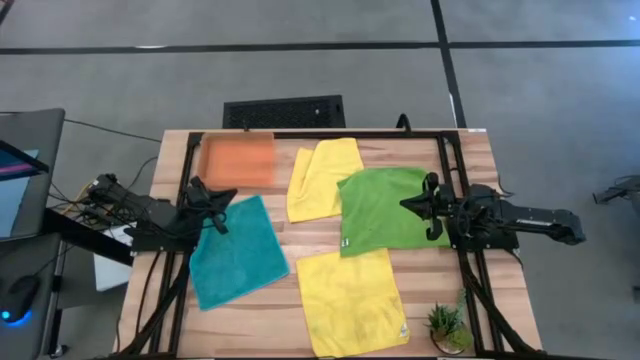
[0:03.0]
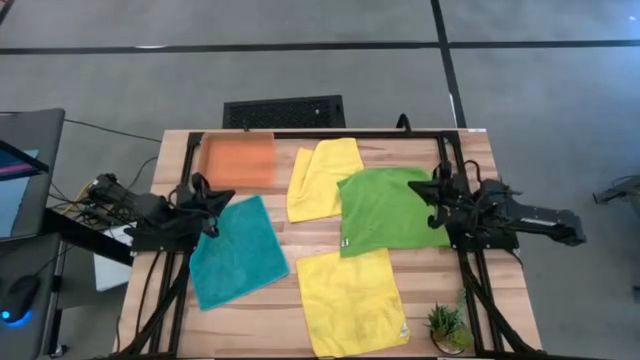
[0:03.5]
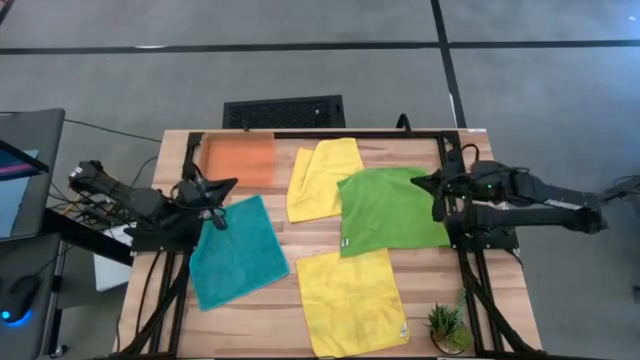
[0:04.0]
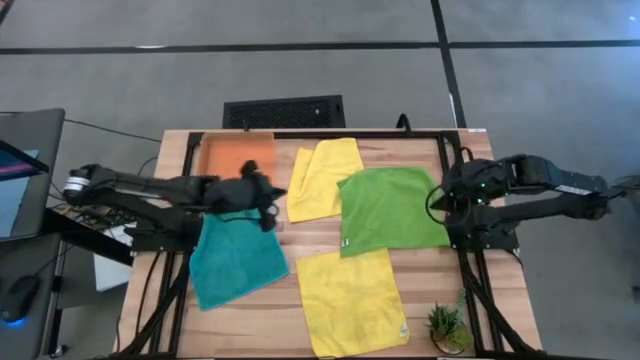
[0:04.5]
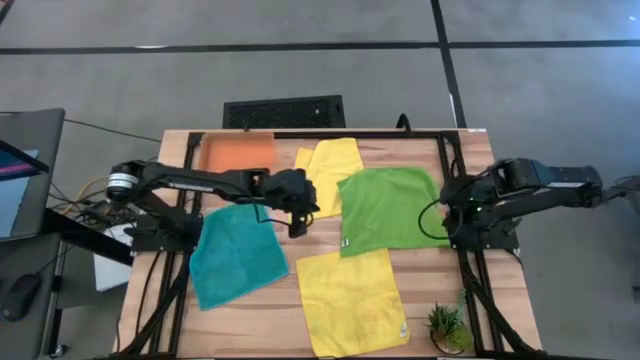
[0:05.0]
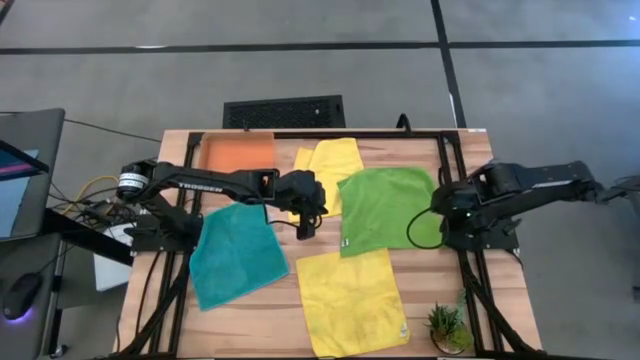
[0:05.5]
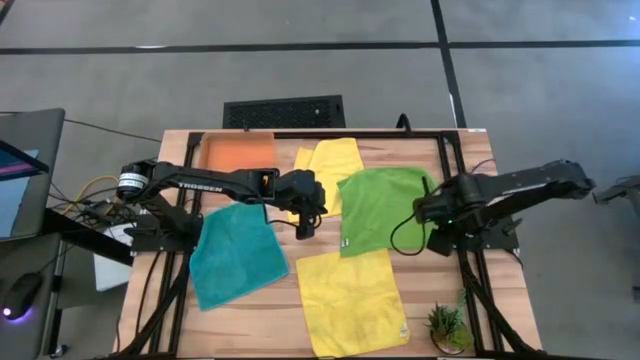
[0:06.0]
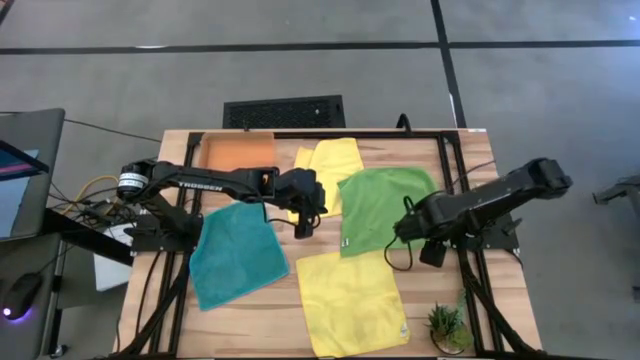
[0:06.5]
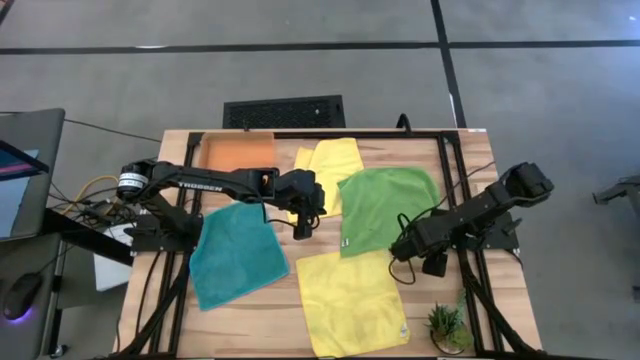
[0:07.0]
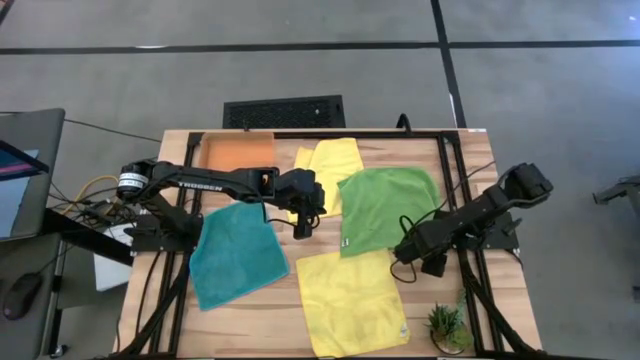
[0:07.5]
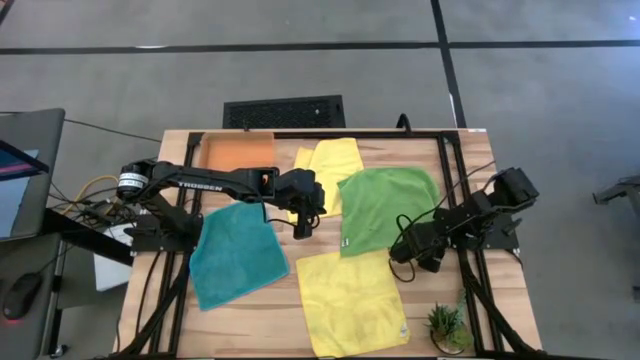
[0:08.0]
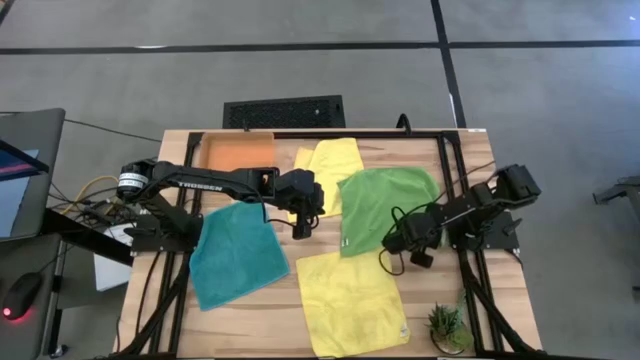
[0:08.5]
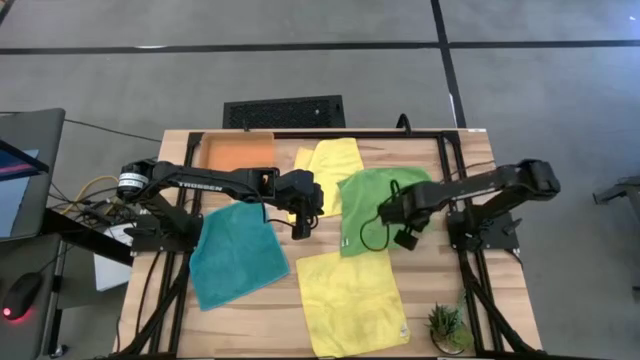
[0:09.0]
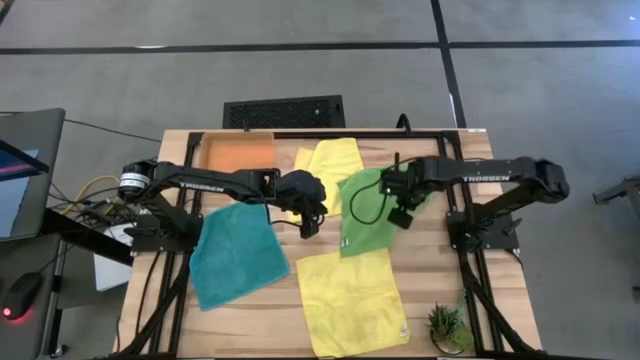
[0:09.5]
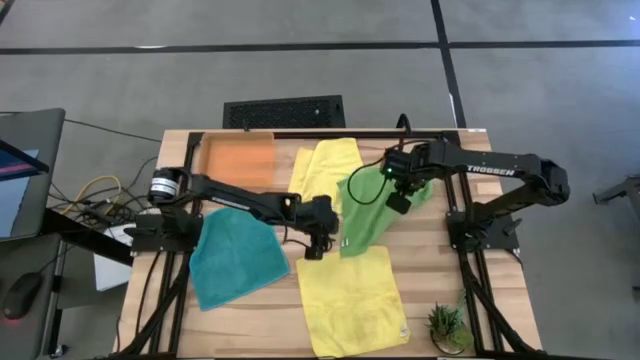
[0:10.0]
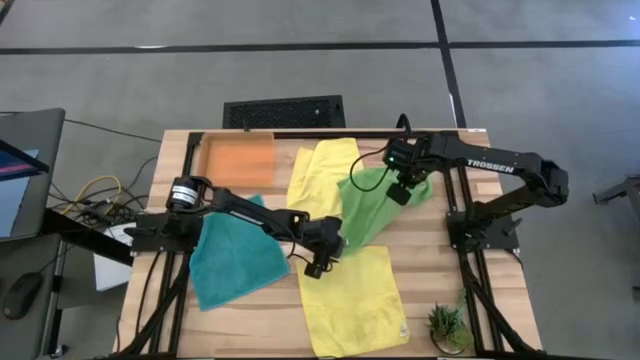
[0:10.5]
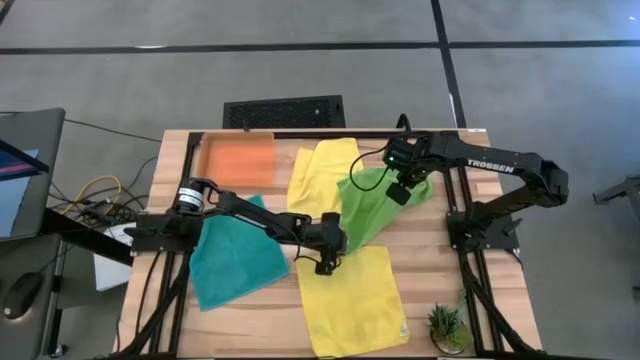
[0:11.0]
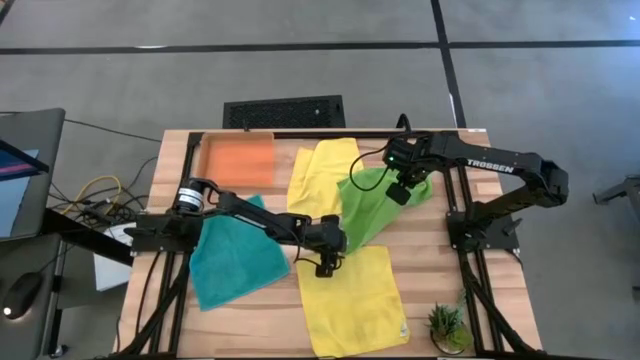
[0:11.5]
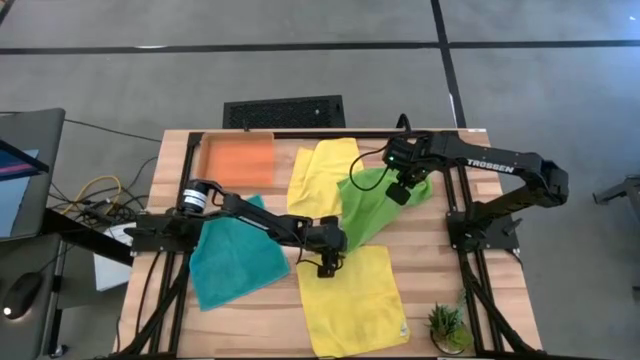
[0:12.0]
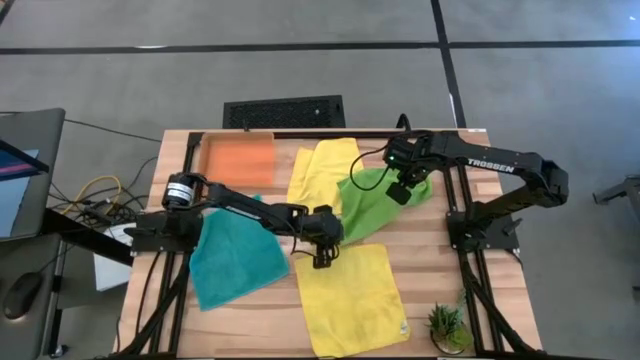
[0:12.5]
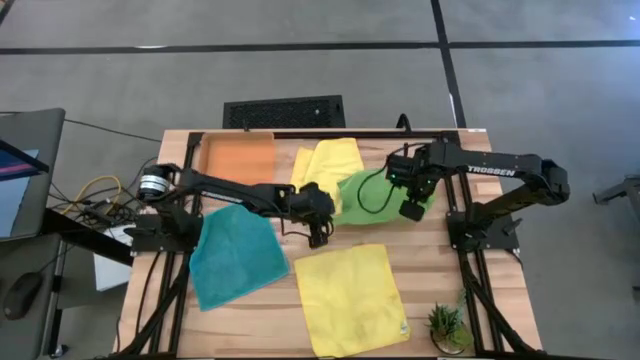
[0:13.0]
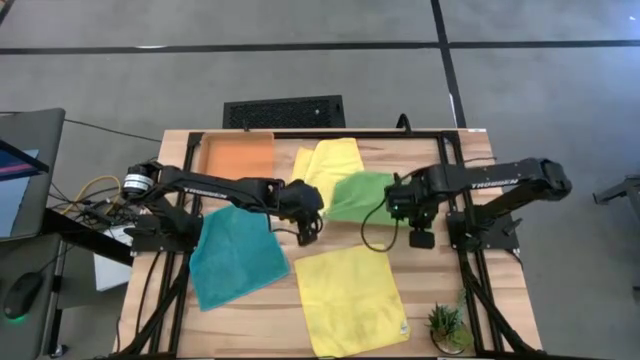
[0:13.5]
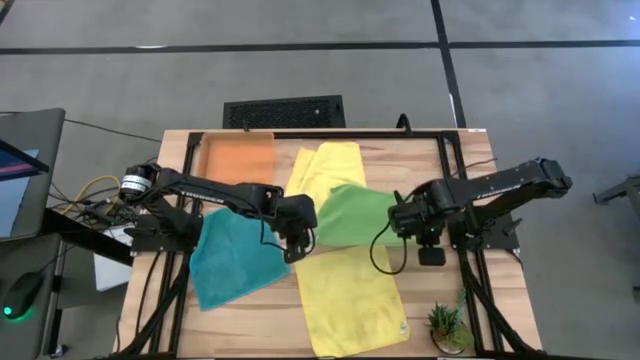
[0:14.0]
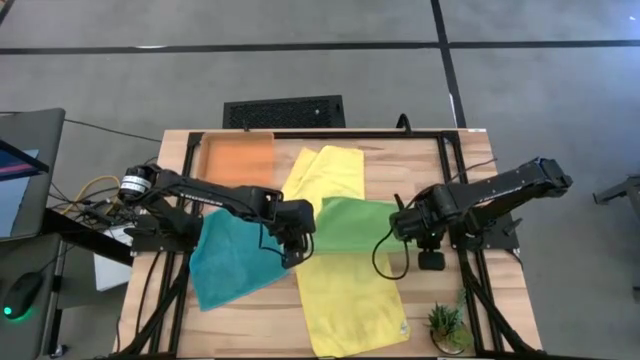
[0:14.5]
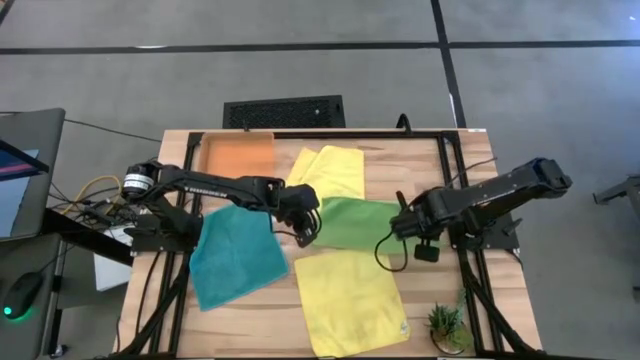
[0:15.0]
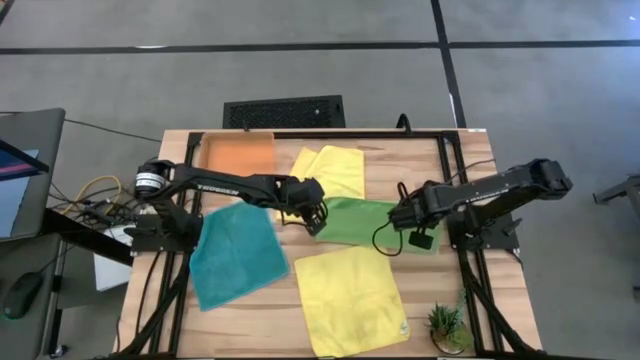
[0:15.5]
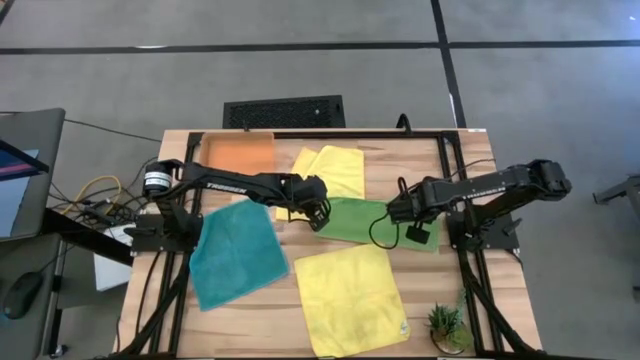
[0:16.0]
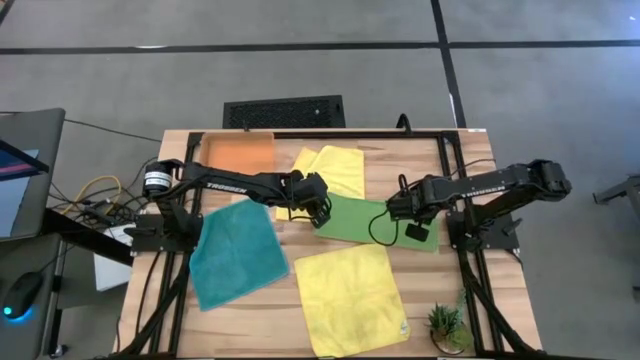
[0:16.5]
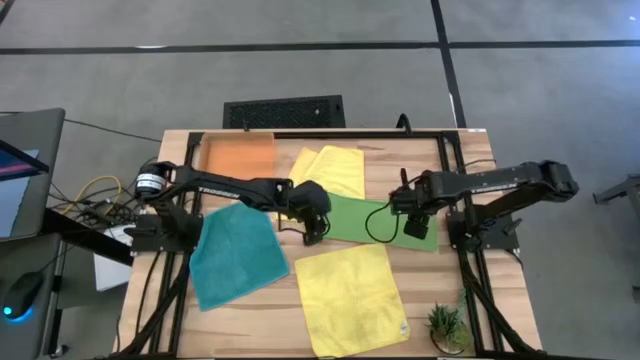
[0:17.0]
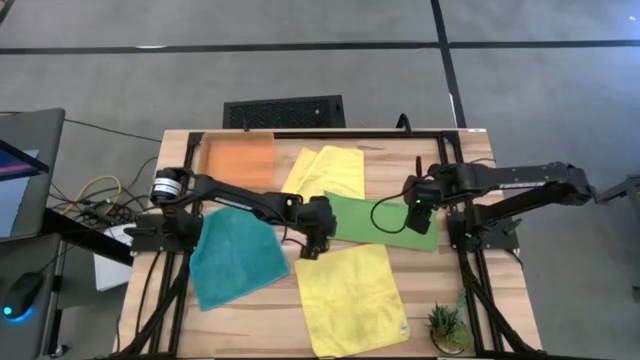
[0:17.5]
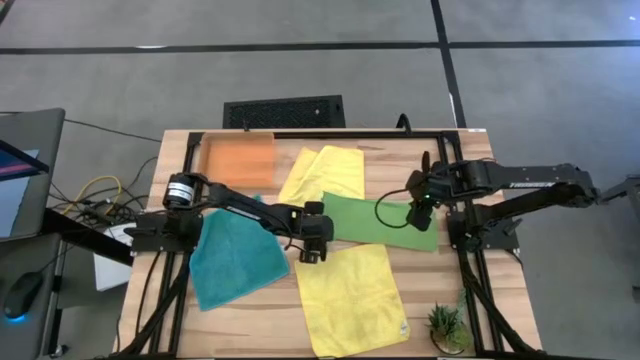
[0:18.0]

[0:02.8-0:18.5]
Task: Fold microfiber towels
Fold the green microfiber towel

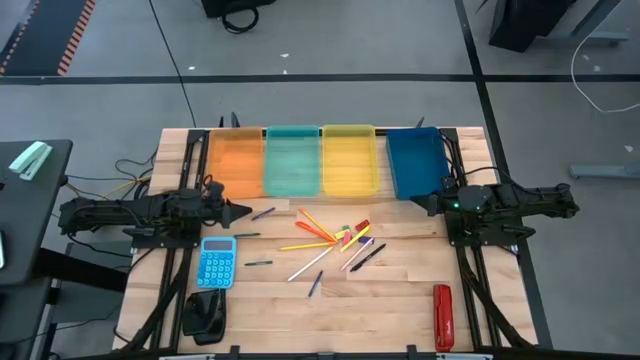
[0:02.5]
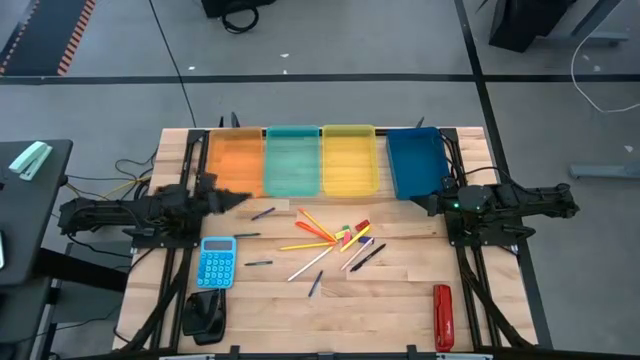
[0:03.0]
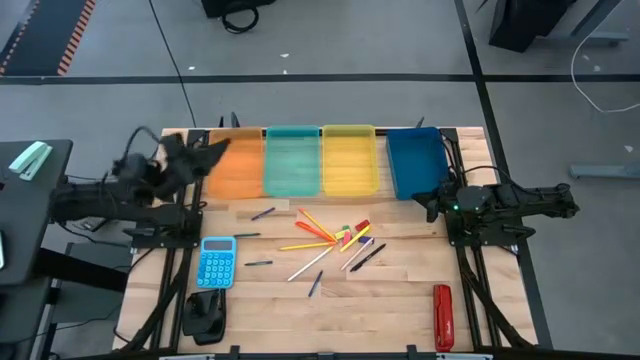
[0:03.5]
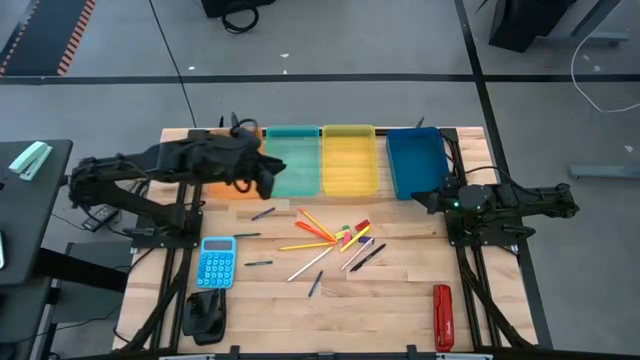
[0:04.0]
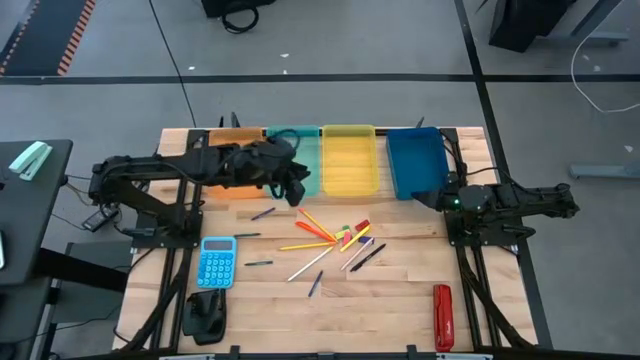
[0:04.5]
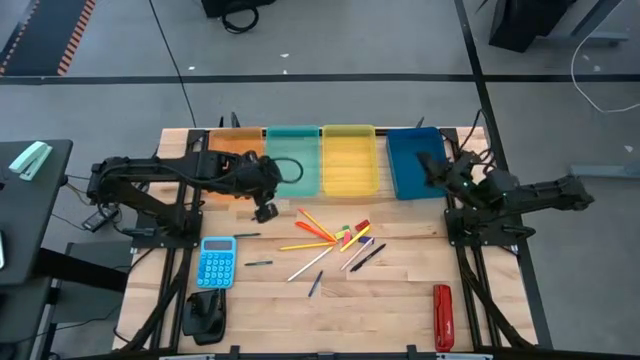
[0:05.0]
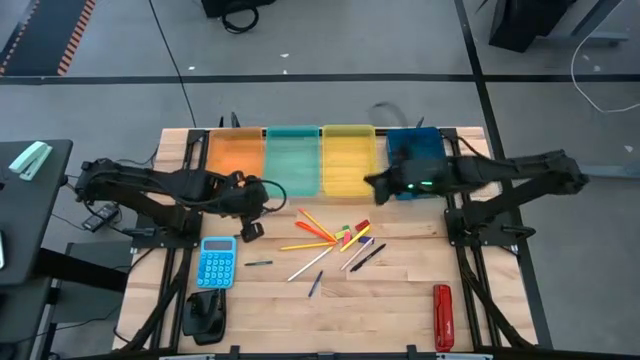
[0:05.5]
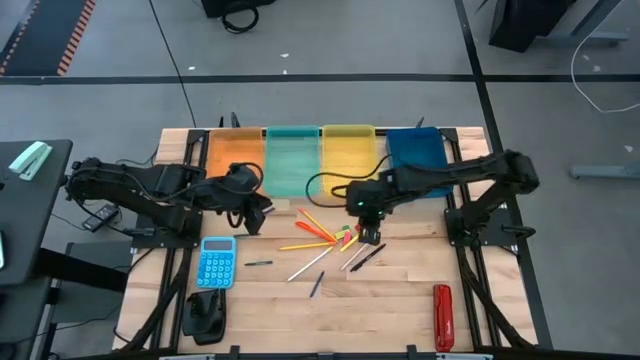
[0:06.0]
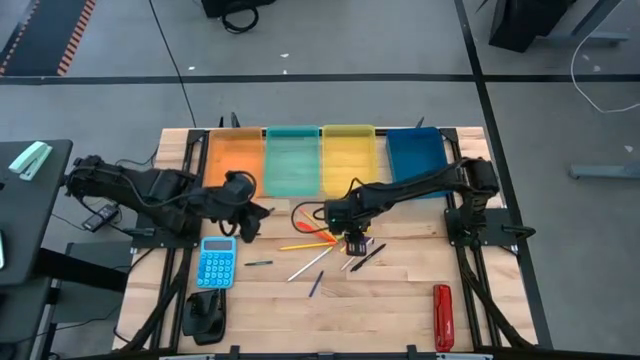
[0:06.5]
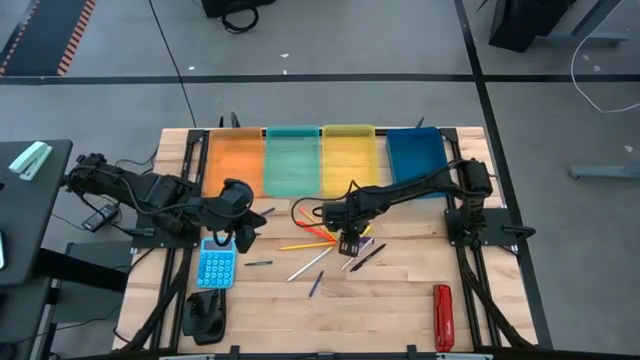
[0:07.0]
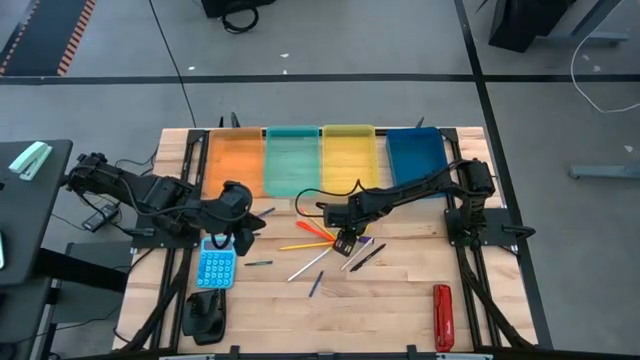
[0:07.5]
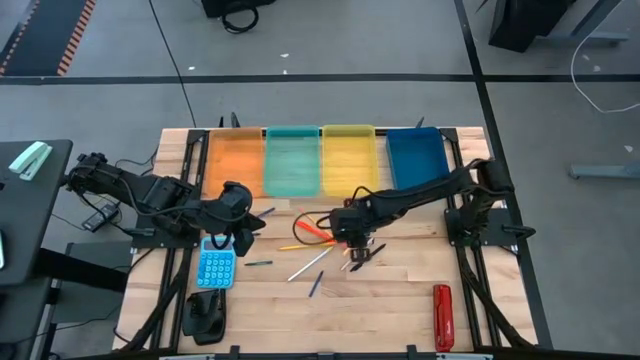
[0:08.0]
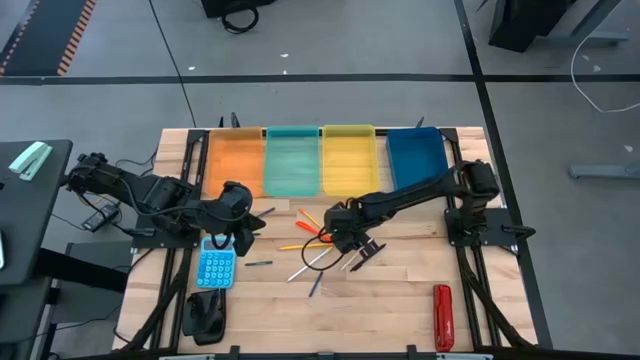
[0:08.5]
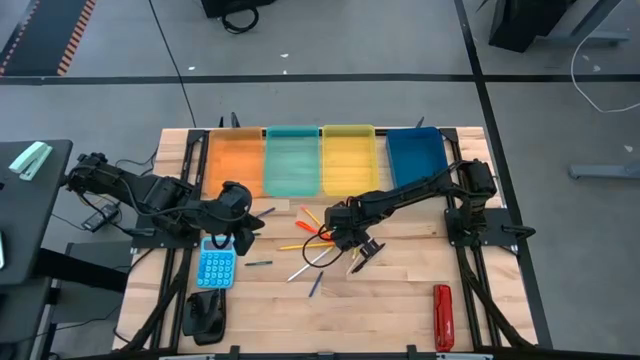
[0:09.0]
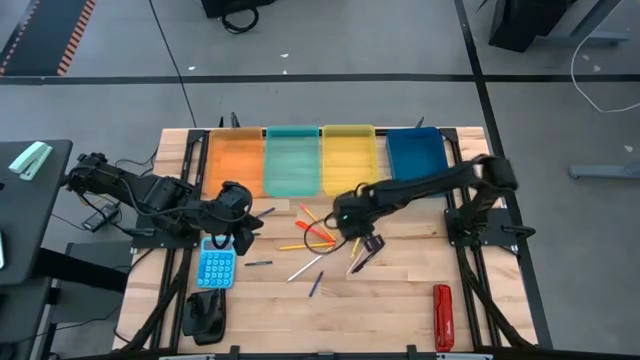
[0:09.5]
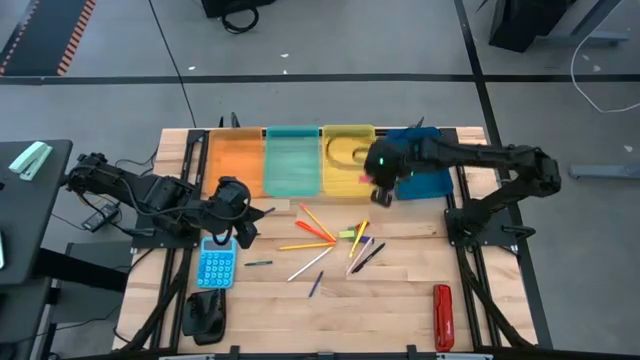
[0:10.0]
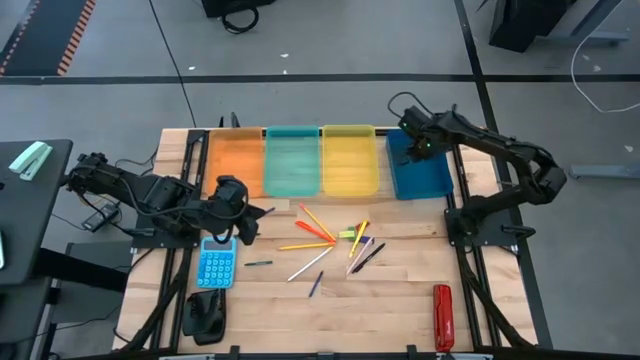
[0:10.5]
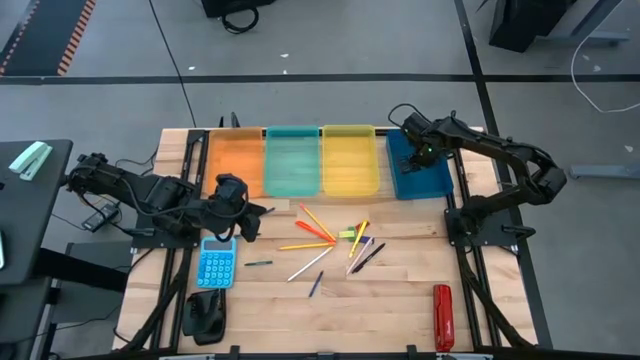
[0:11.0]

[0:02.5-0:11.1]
Task: Sort crayons/erasers/pens/pencils in bins
Put the pink eraser into the blue bin
